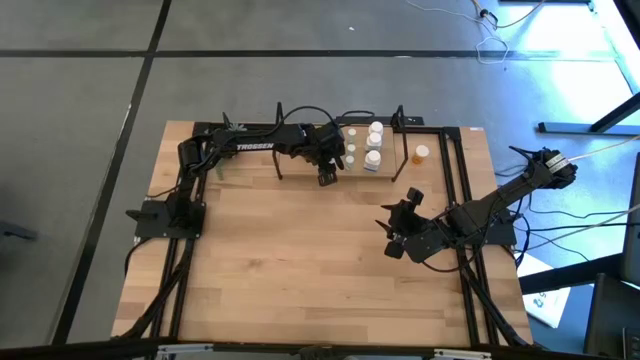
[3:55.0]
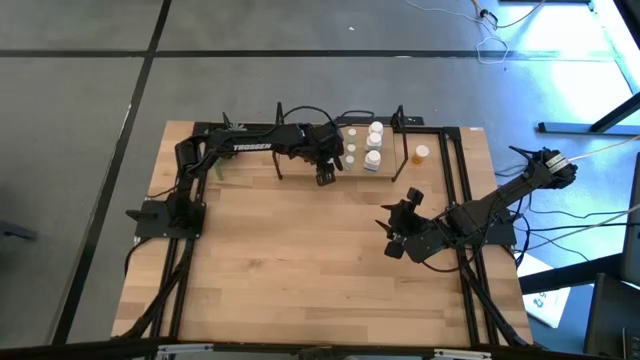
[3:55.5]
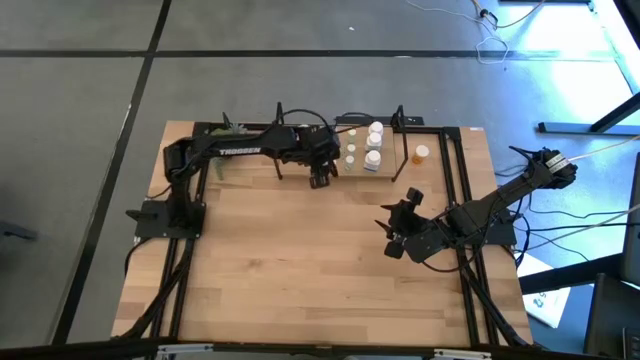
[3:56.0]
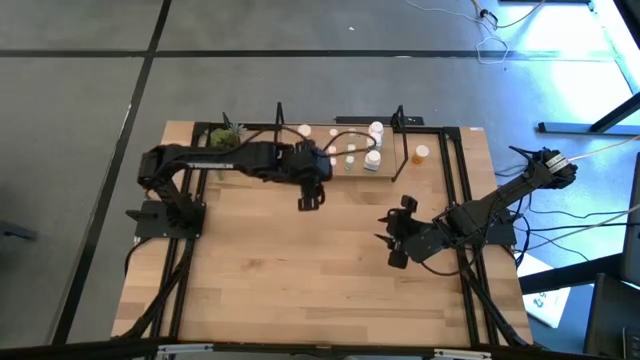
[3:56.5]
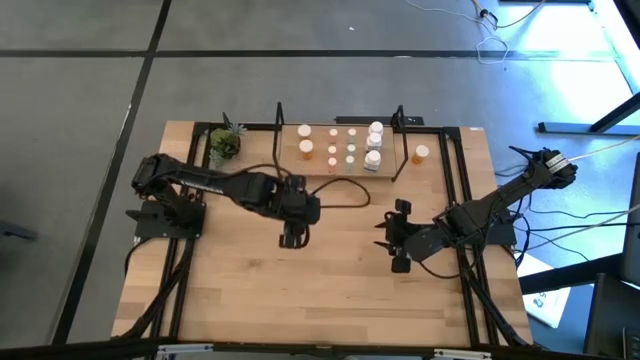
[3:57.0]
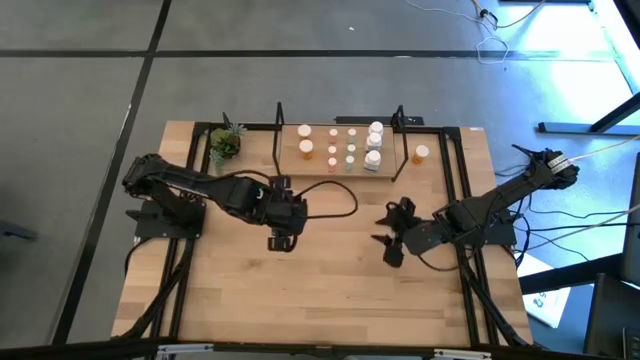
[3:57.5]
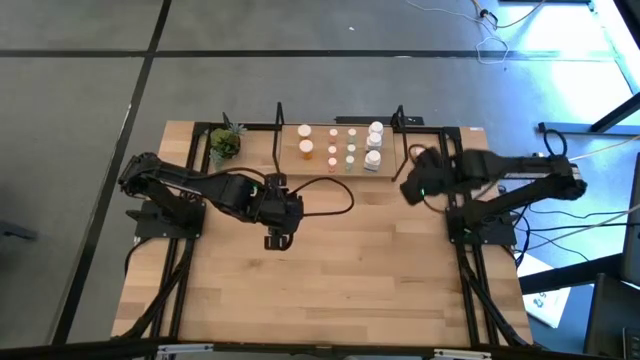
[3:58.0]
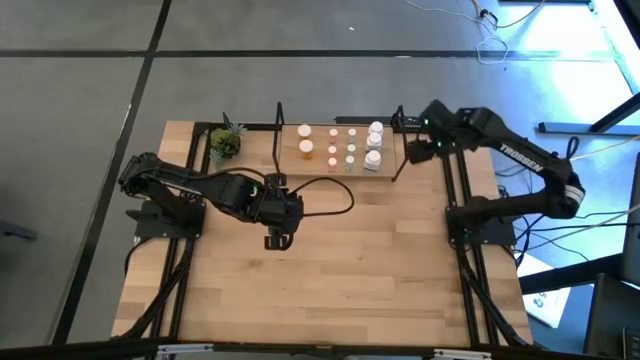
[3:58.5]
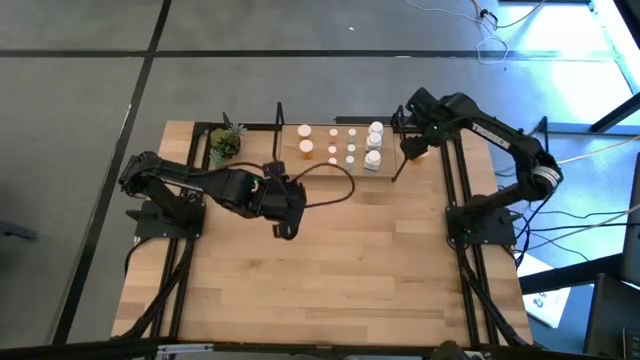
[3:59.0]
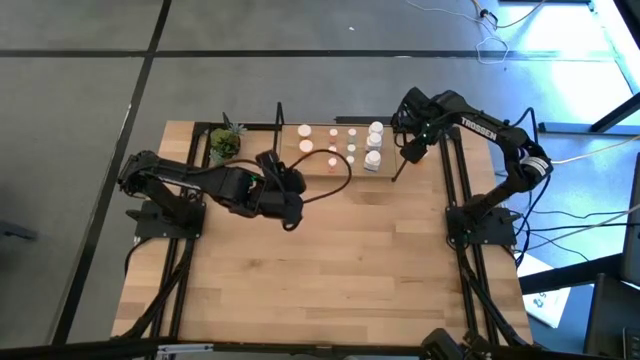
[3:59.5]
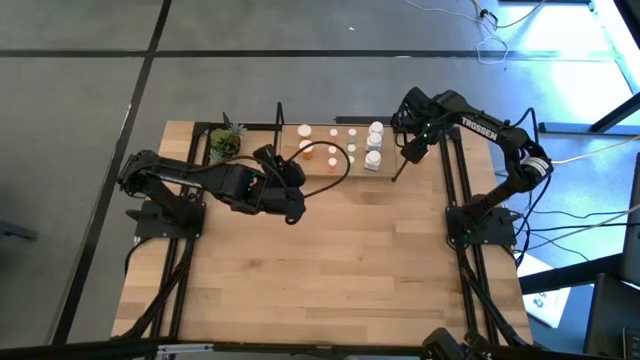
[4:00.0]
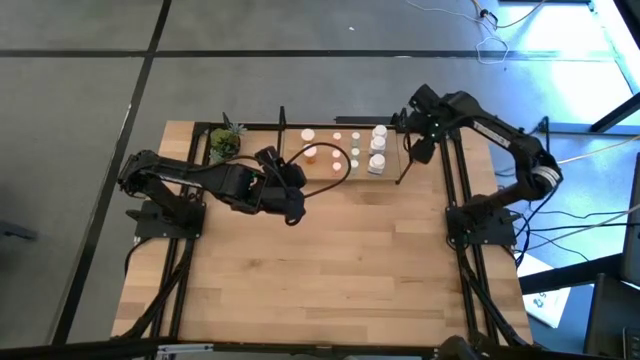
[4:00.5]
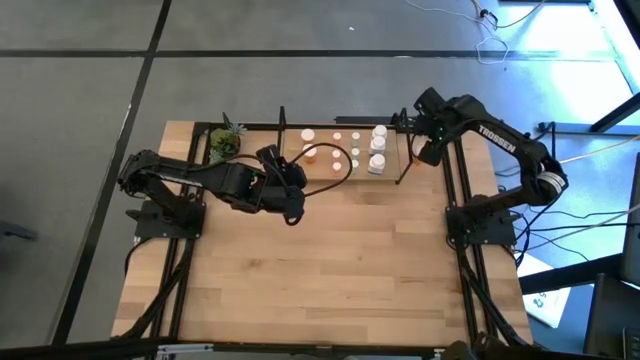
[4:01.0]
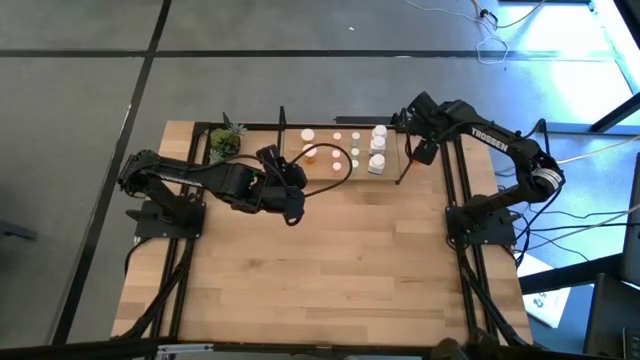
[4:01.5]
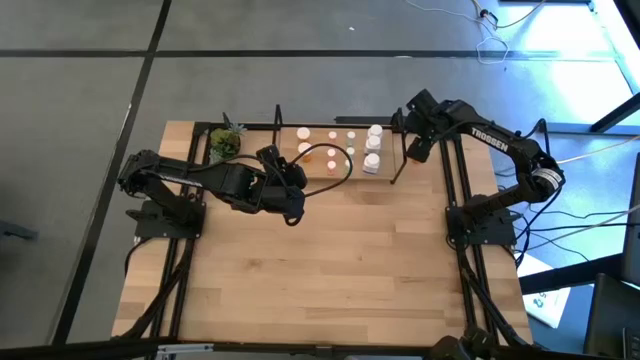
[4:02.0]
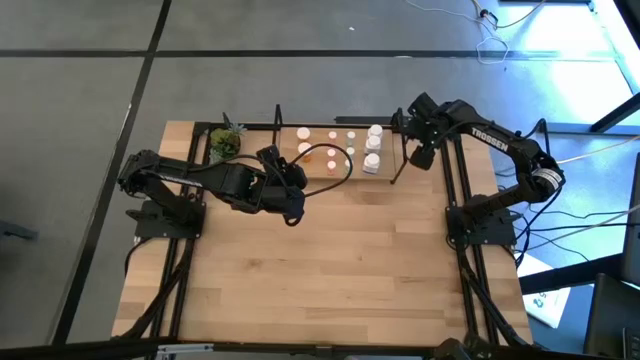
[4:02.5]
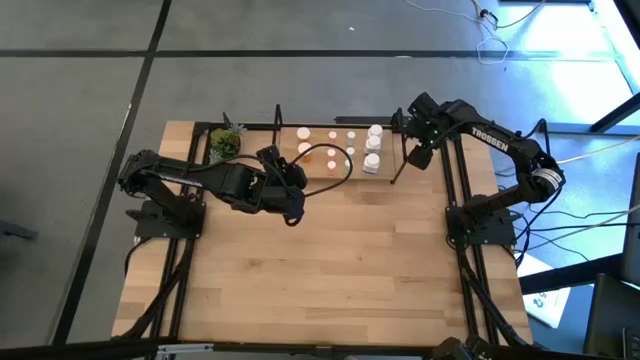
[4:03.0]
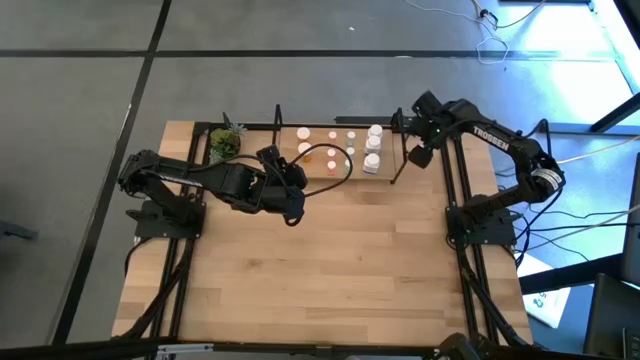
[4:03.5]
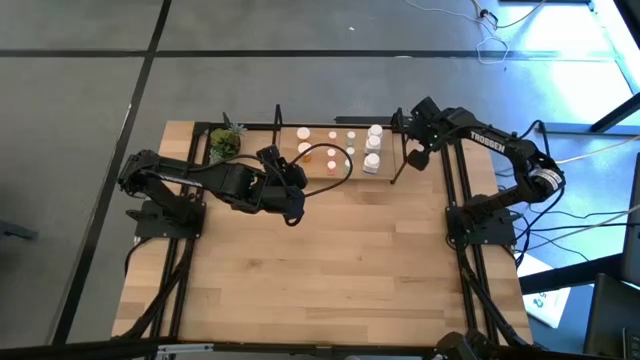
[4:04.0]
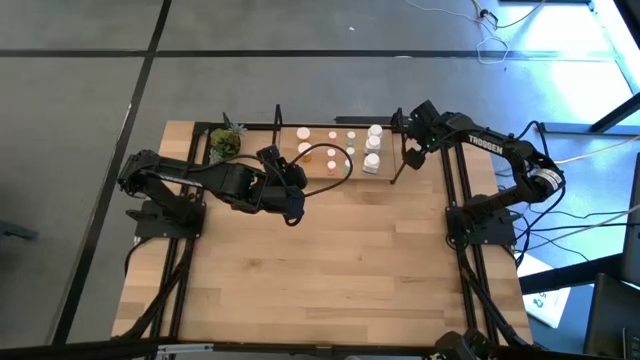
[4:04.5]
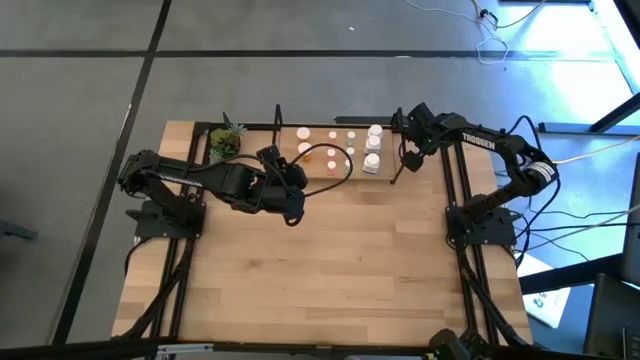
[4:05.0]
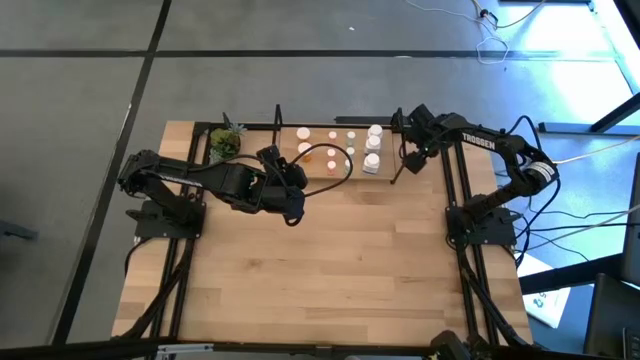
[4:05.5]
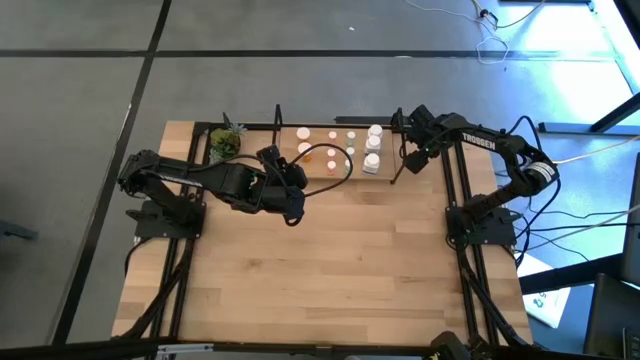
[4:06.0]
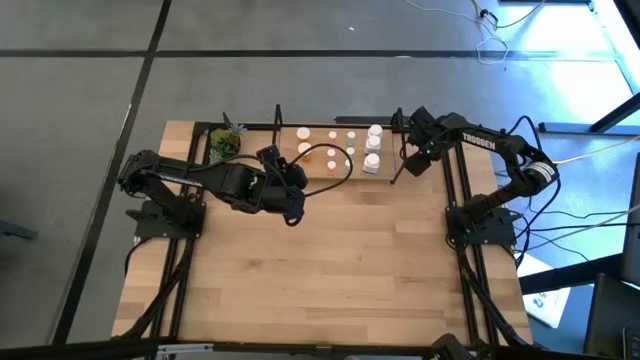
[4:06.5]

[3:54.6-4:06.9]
Task: Pick and place medicine bottles onto shelf by color
Put the orange pill bottle on the shelf aligned with the orange pill bottles

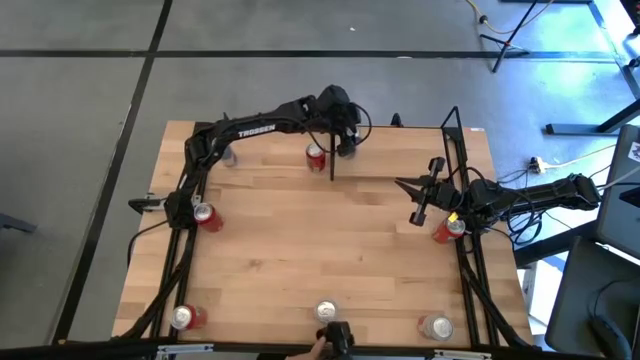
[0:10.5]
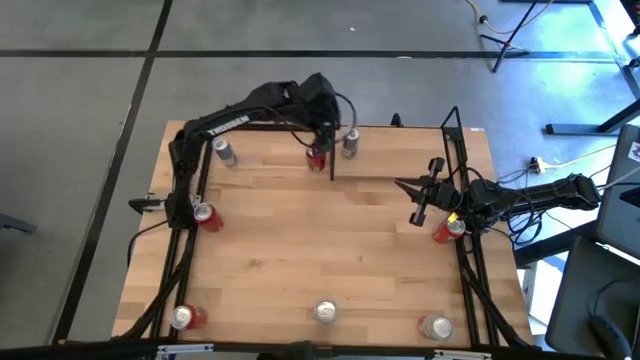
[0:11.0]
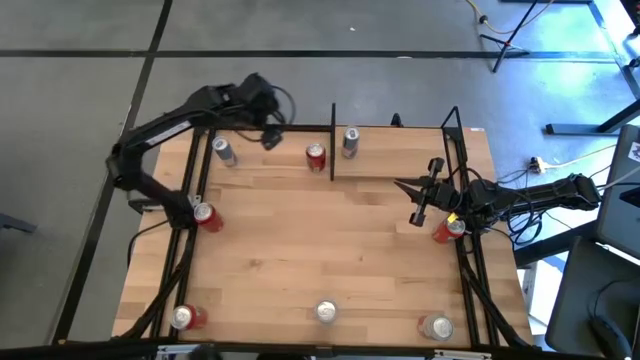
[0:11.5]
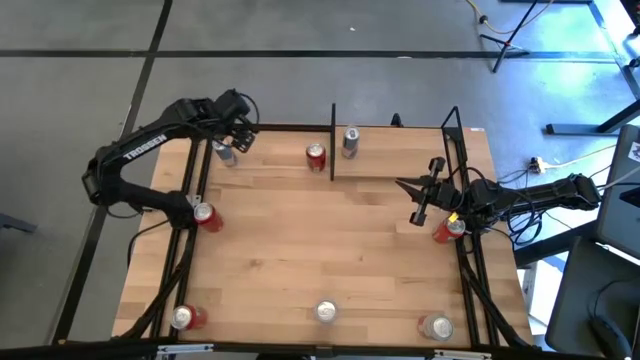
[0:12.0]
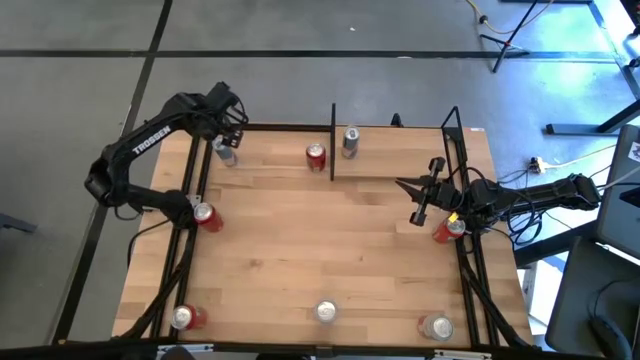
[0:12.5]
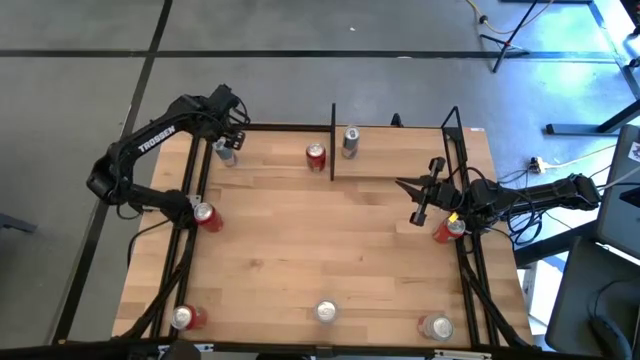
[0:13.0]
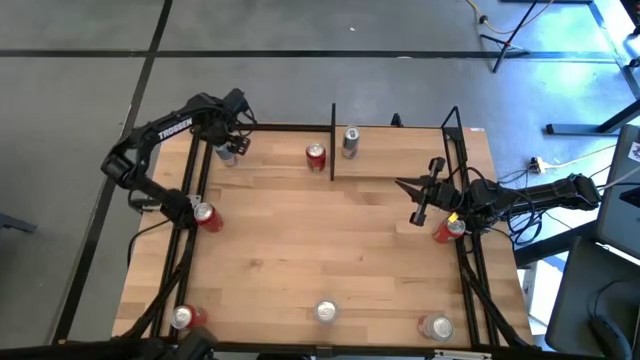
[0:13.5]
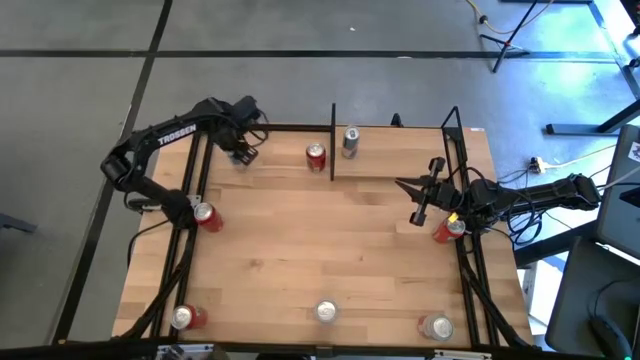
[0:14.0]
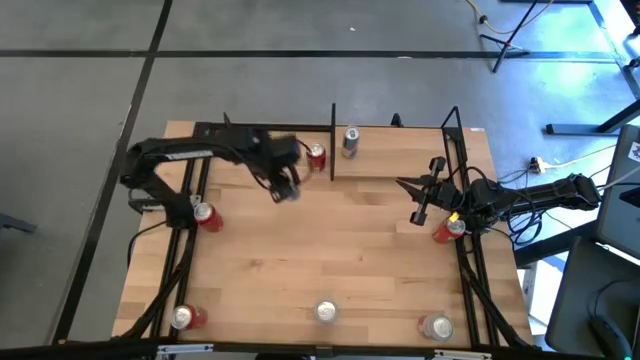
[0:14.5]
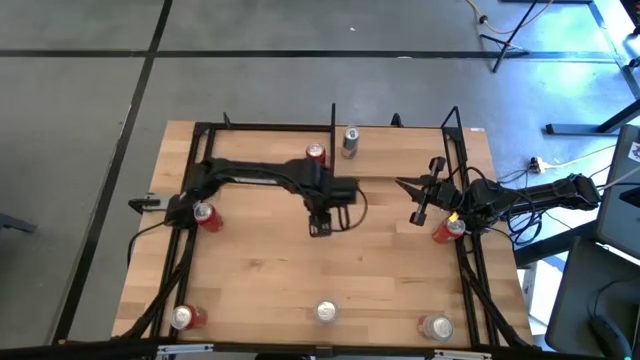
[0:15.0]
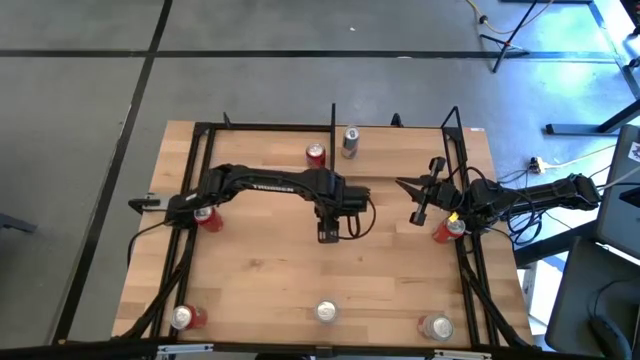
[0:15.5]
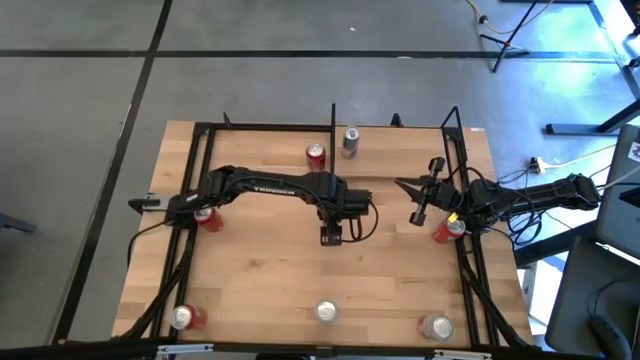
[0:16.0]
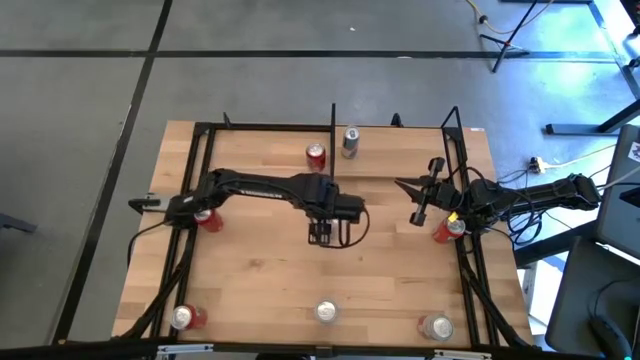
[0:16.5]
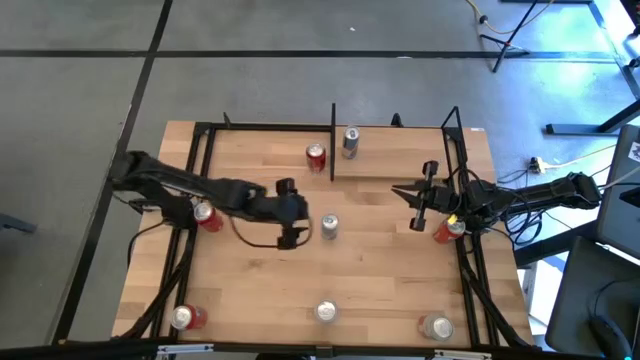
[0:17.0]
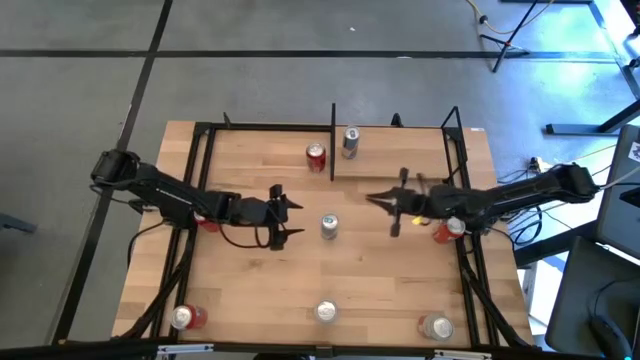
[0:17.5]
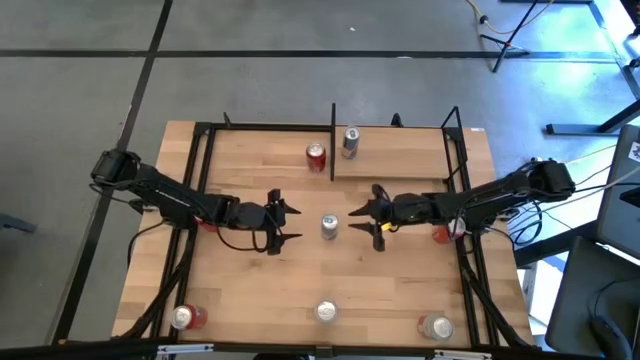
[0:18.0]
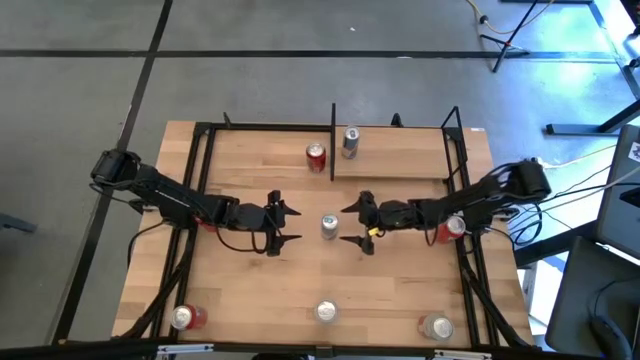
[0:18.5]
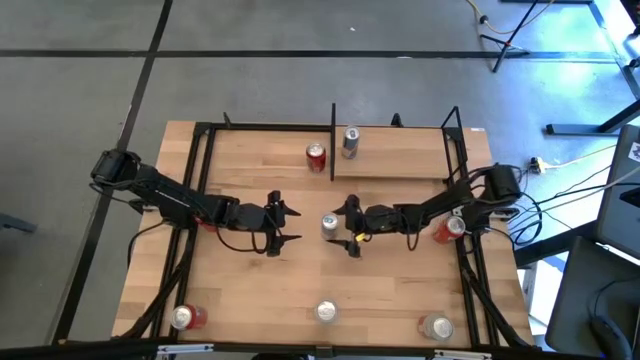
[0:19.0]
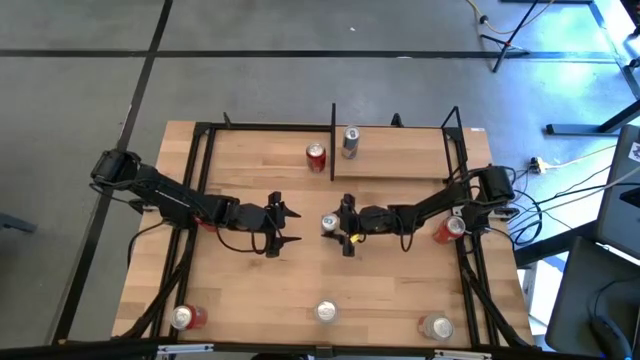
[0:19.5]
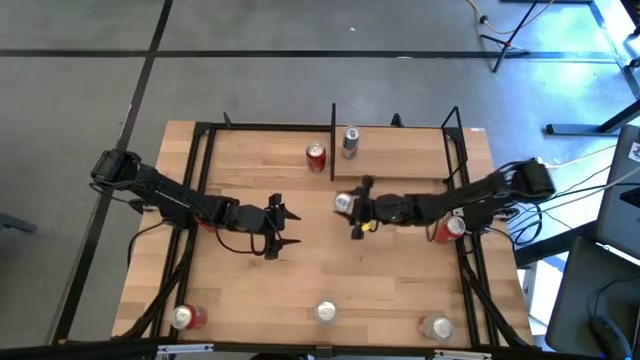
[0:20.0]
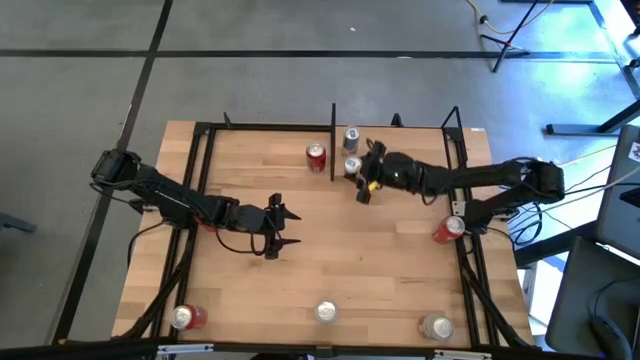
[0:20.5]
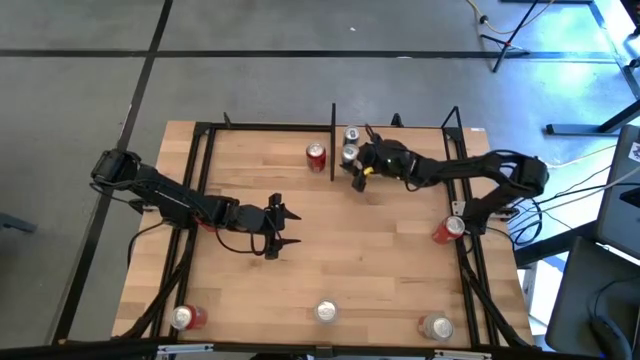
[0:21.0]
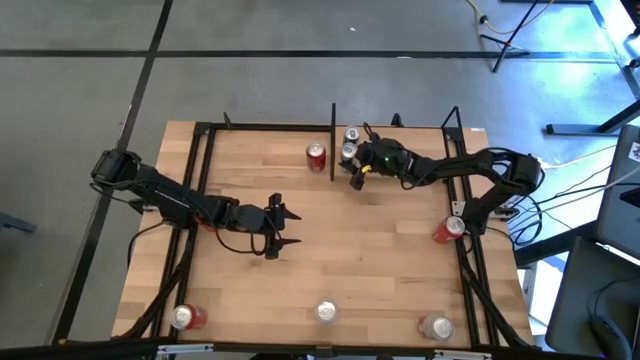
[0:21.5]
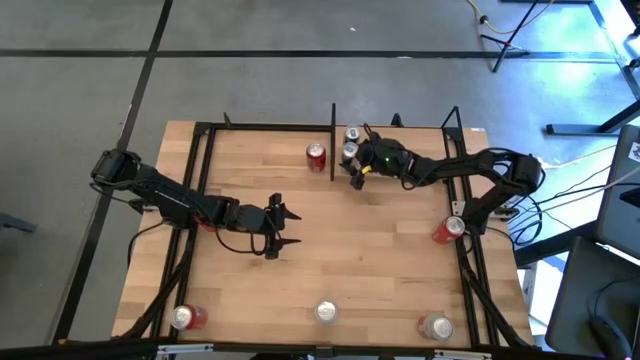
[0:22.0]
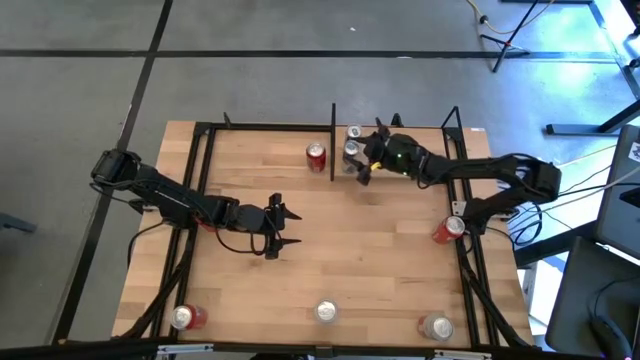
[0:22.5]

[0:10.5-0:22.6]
Task: Place canned beverage on shelf
Put the blue soda can on the shelf aligned with the other blue soda can
